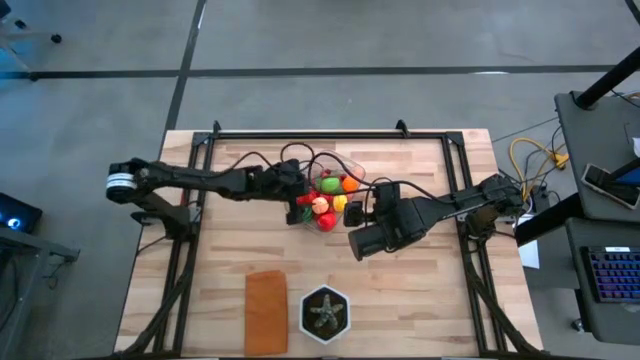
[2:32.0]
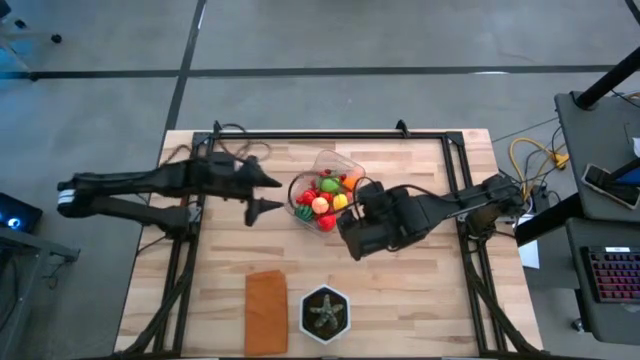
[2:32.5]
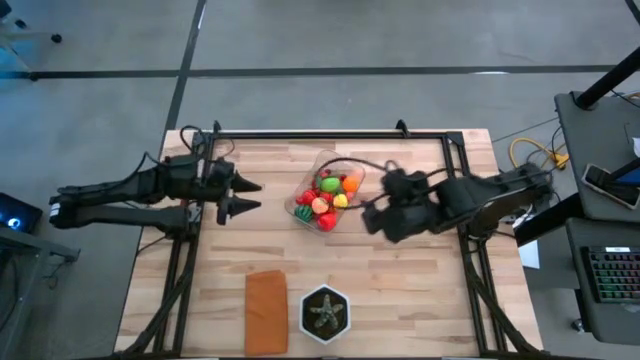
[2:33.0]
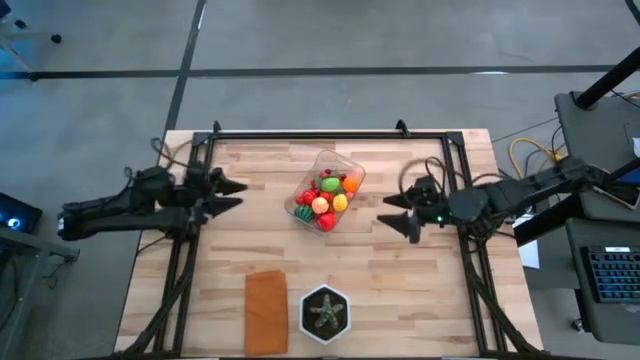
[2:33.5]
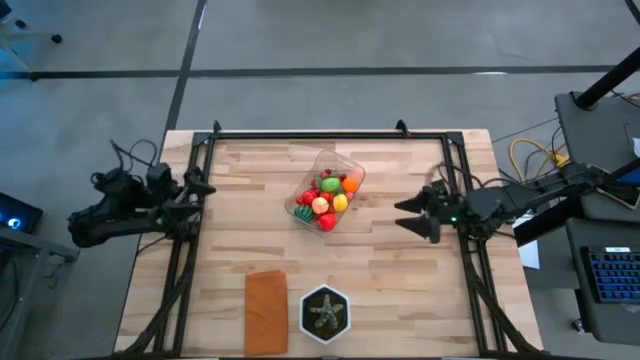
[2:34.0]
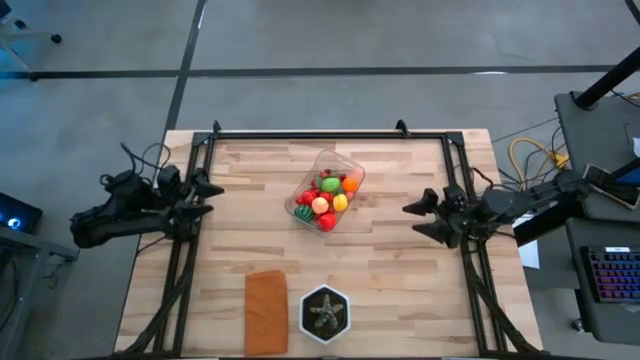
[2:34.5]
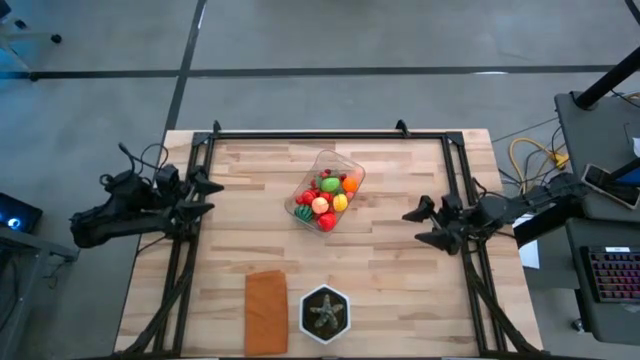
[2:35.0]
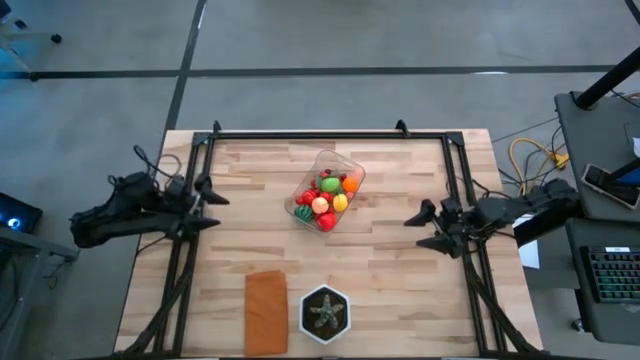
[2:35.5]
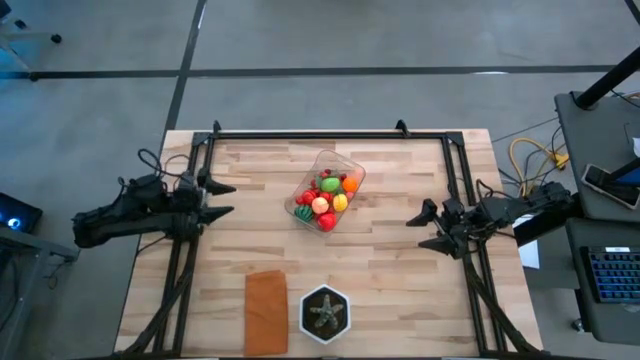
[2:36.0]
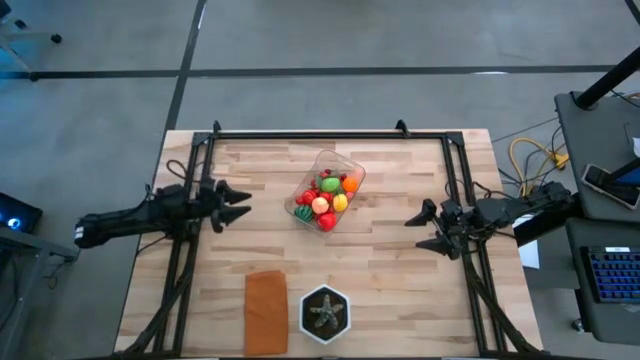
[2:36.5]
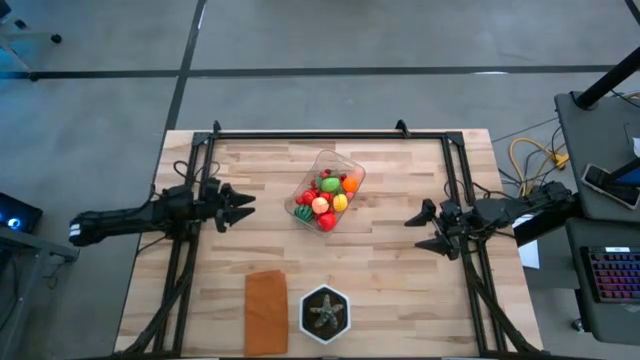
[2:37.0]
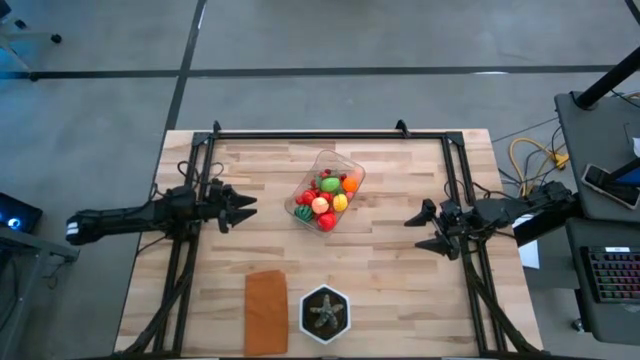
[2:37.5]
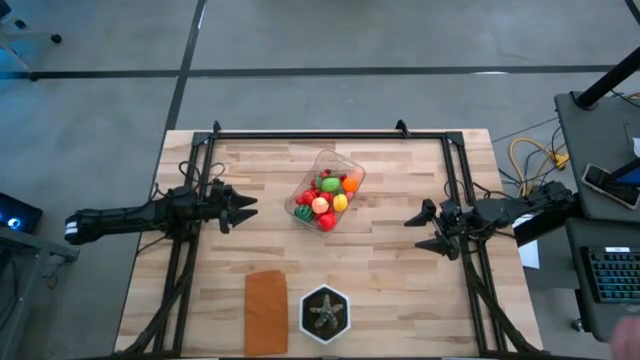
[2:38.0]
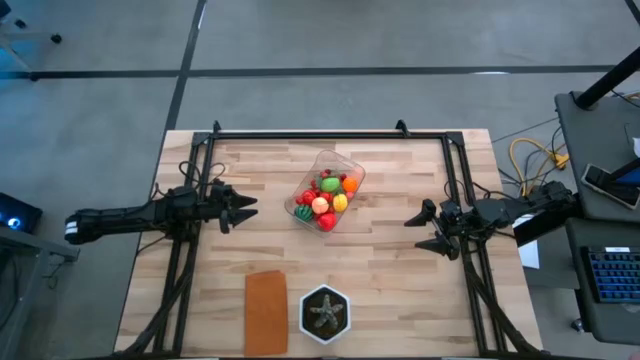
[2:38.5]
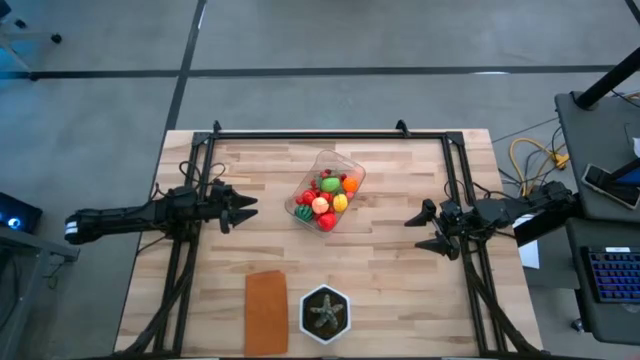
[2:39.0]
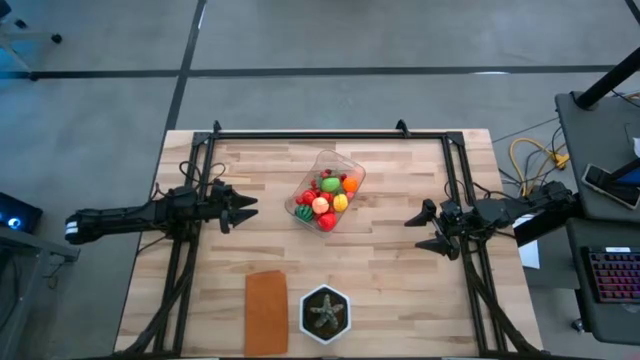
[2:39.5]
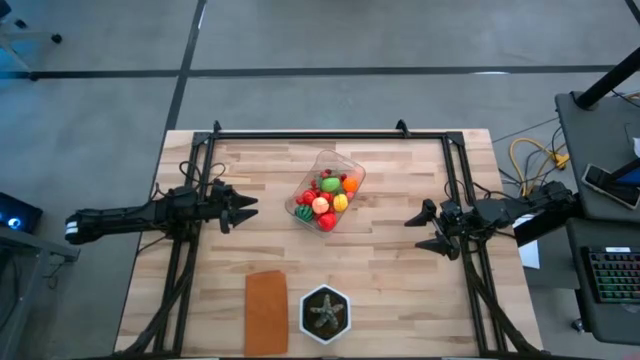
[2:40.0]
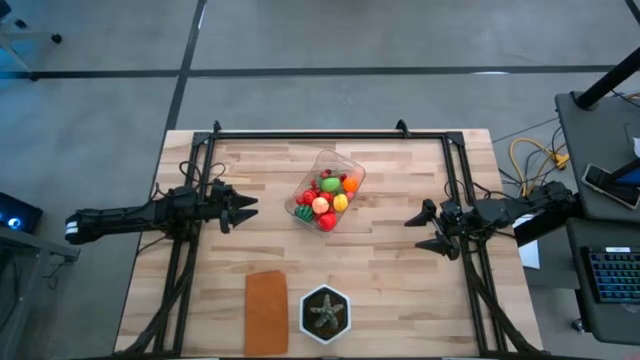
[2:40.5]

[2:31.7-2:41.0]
Task: Pick and placing Produce into tupperware
Return to Home Position

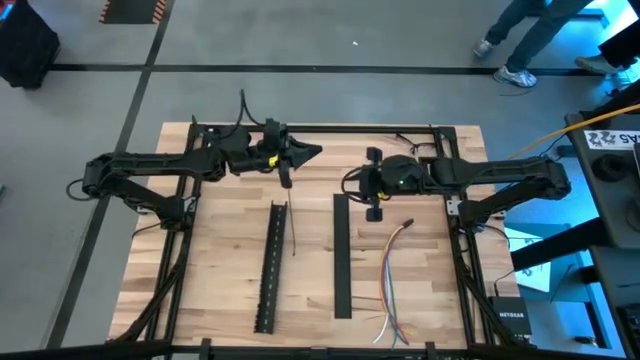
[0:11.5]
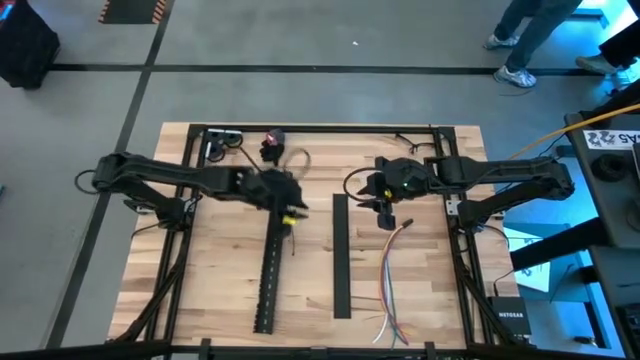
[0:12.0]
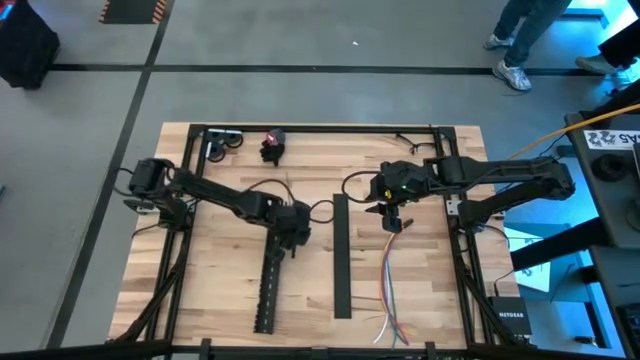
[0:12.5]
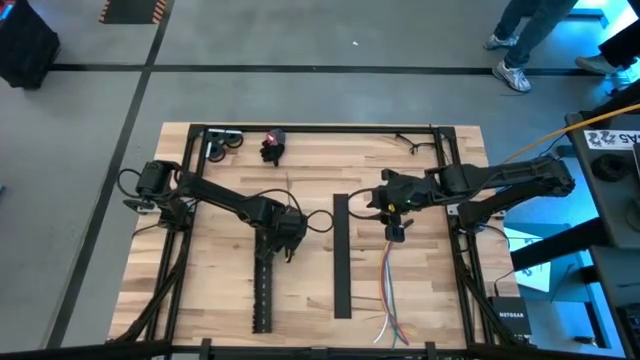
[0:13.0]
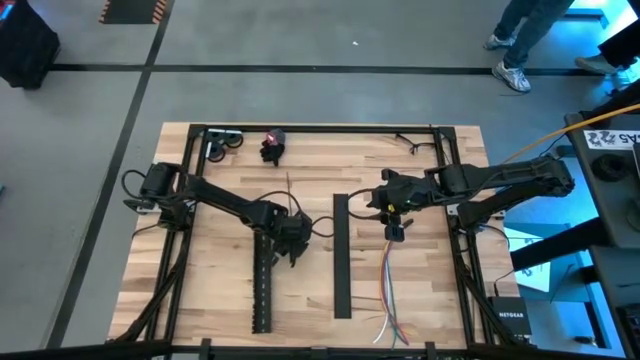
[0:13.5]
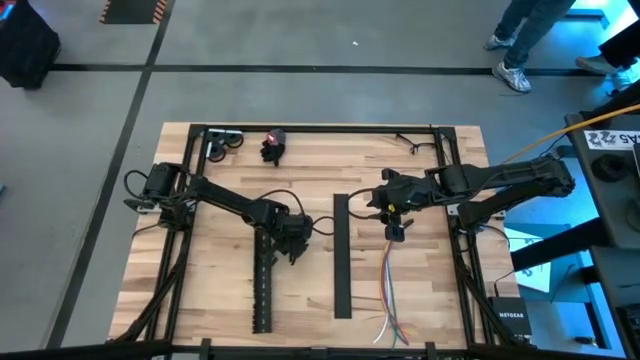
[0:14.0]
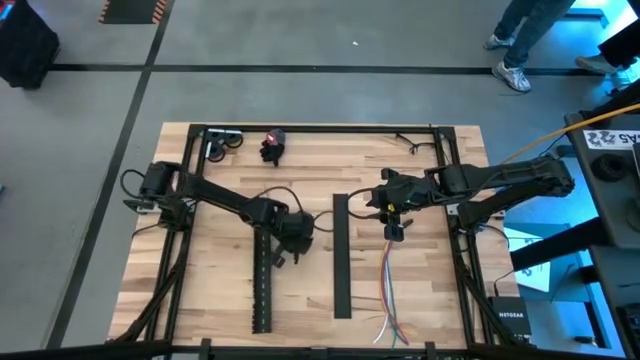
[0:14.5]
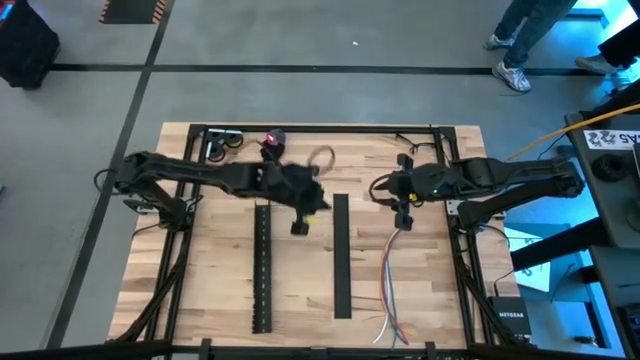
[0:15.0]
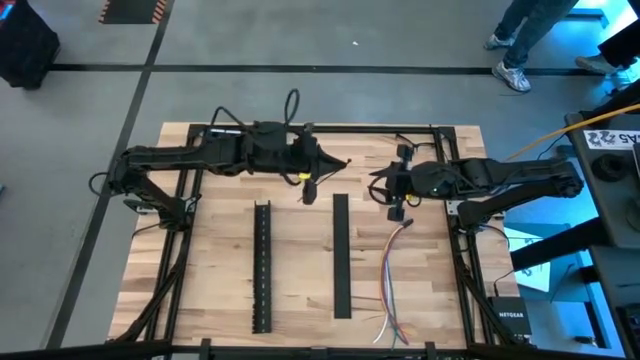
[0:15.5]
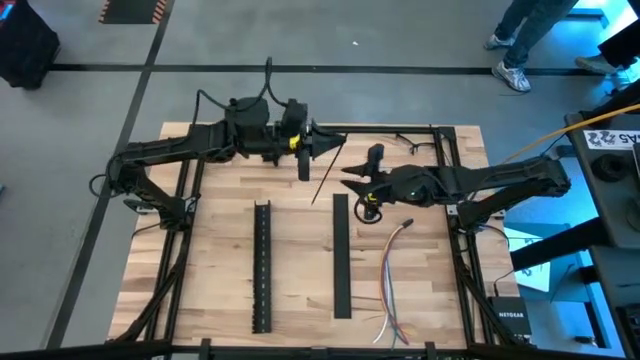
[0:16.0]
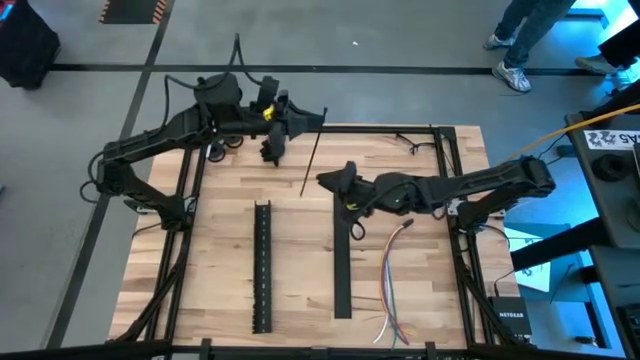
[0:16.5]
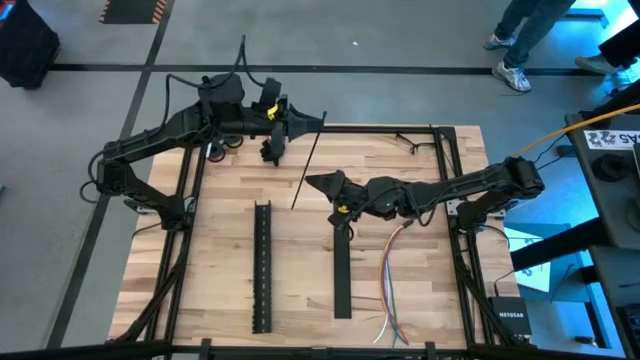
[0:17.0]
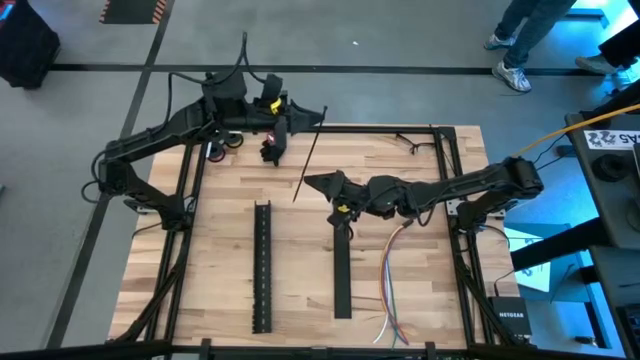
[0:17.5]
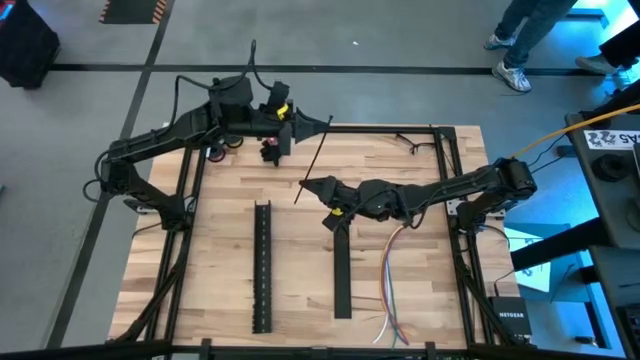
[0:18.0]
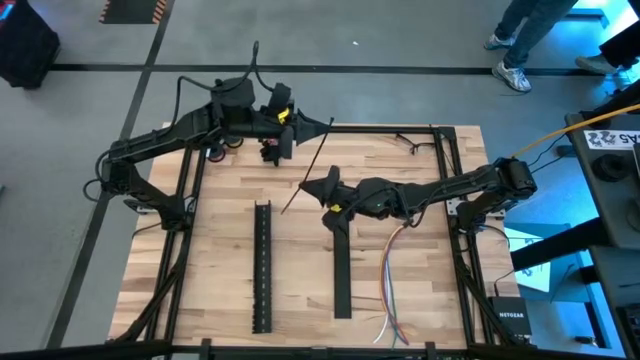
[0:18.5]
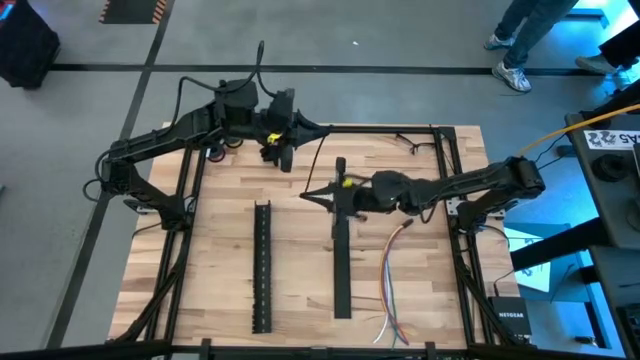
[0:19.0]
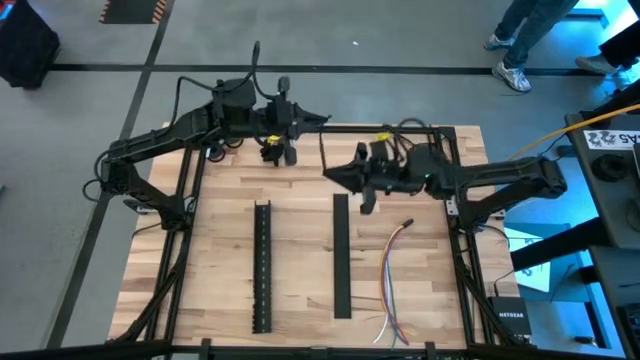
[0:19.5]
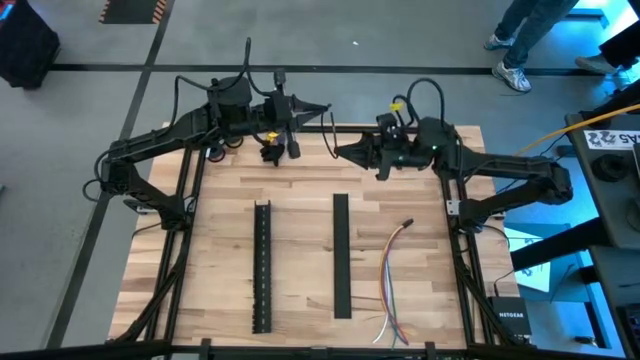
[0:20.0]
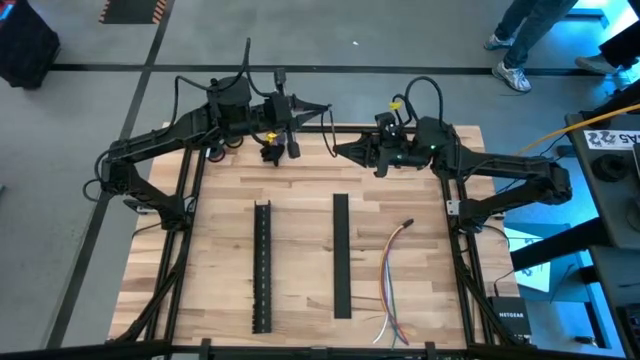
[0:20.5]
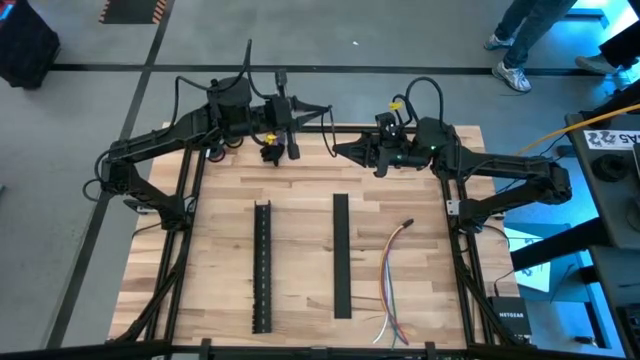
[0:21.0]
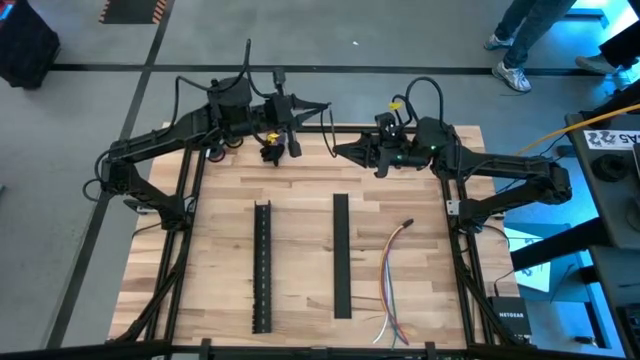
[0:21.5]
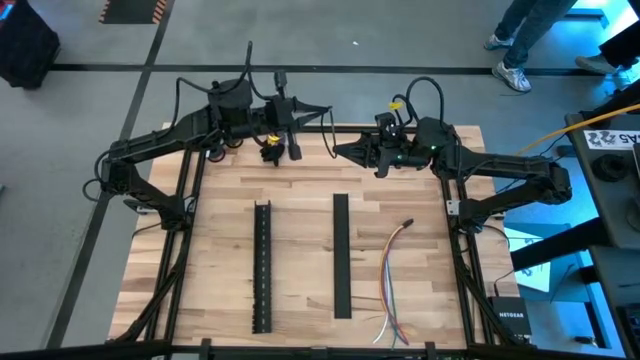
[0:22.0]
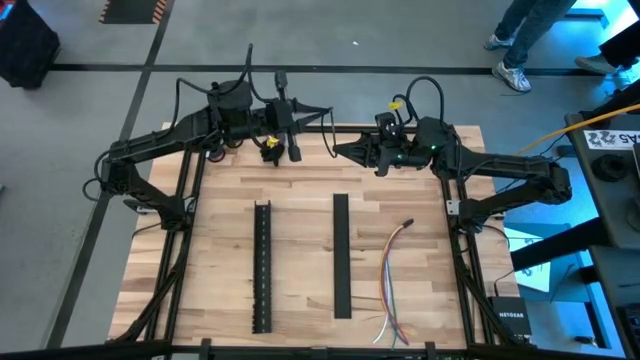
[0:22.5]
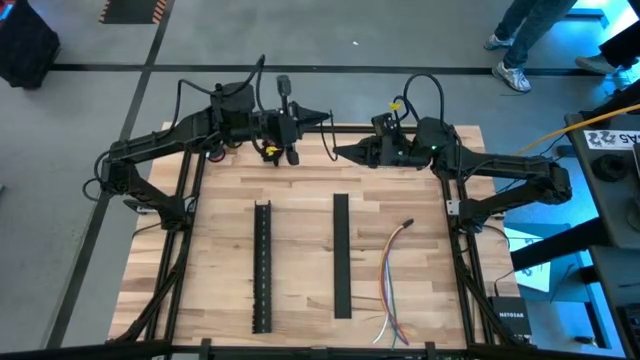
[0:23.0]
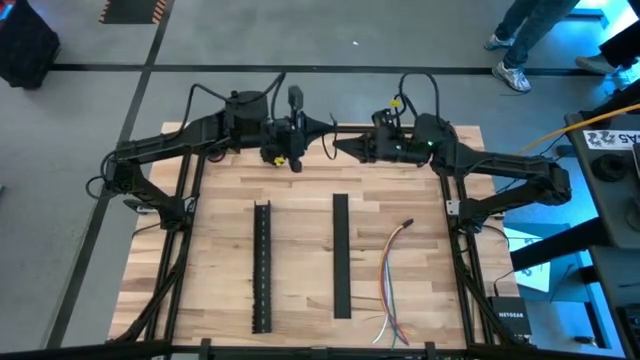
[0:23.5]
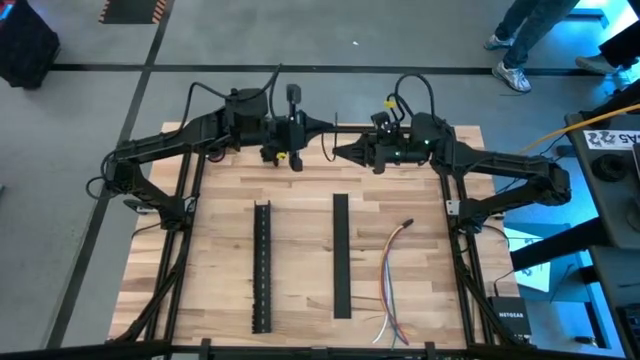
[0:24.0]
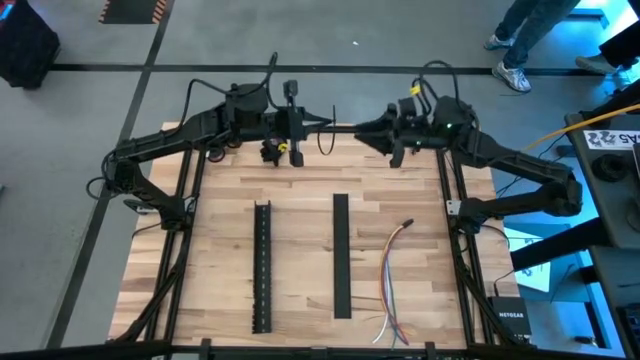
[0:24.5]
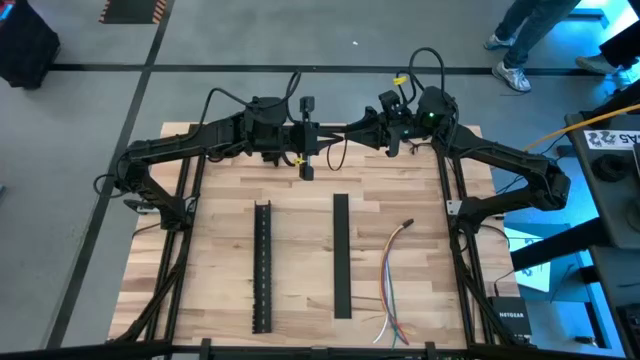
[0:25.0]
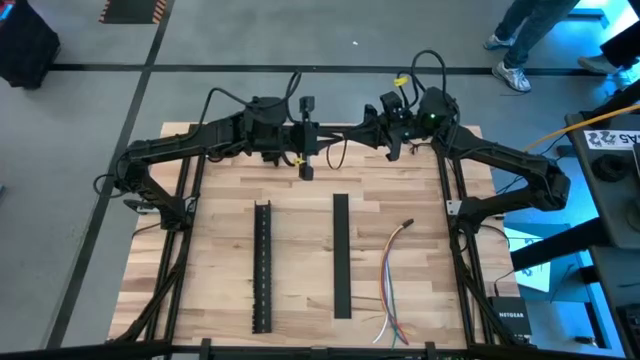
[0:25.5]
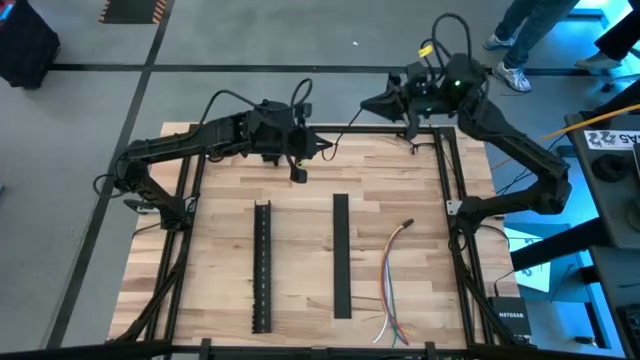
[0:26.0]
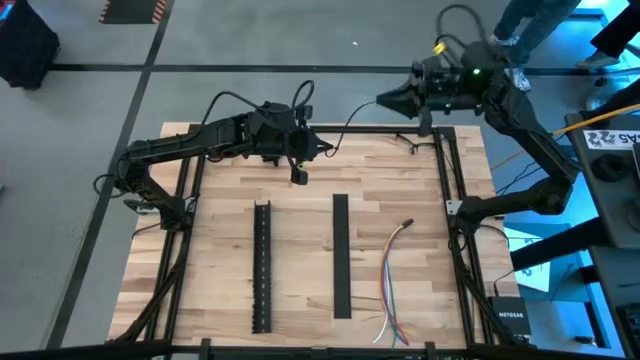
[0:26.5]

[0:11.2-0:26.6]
Task: Ziptie cables
Insert the black zip tie
